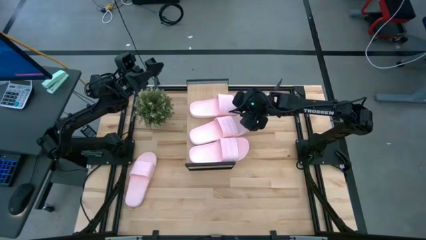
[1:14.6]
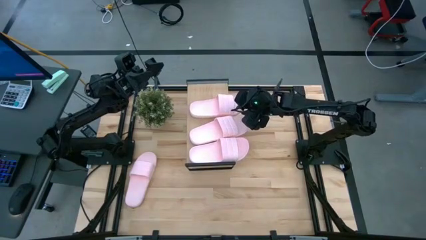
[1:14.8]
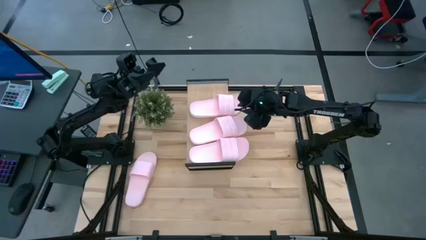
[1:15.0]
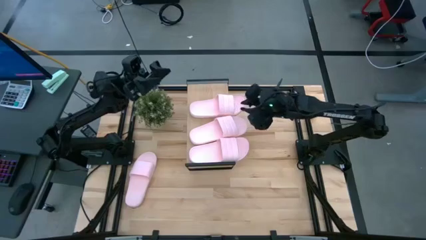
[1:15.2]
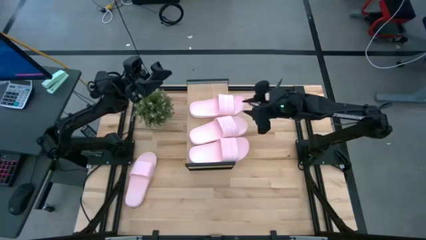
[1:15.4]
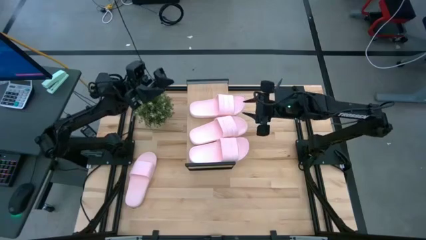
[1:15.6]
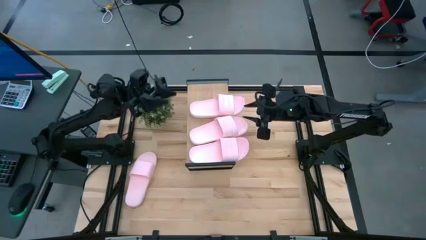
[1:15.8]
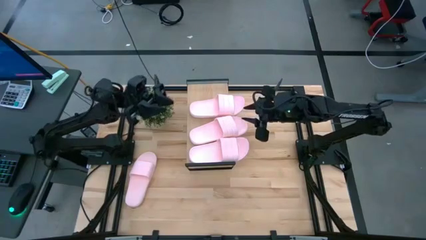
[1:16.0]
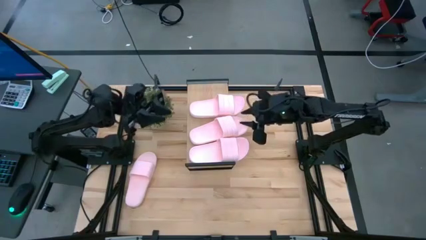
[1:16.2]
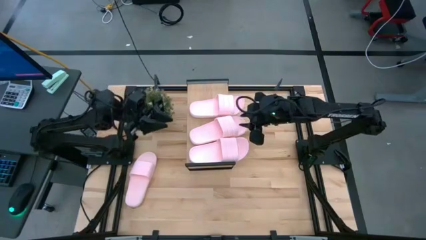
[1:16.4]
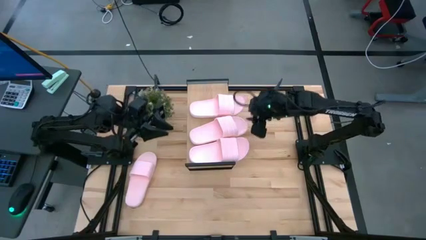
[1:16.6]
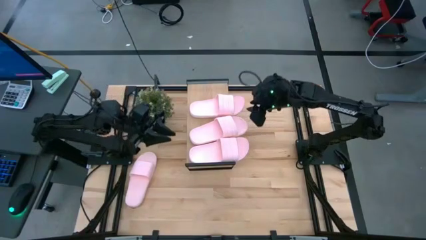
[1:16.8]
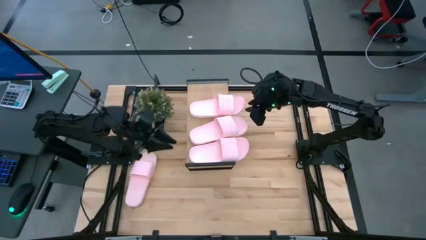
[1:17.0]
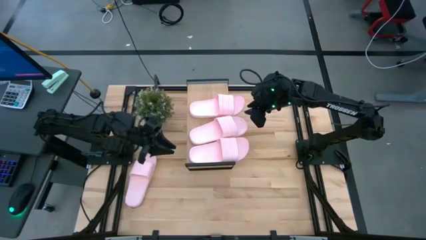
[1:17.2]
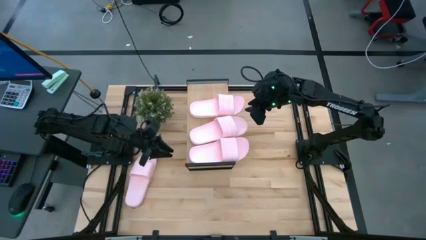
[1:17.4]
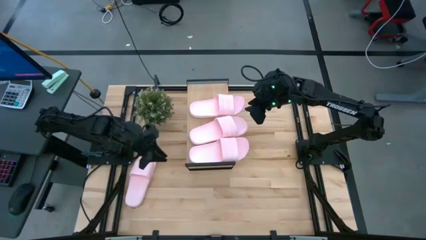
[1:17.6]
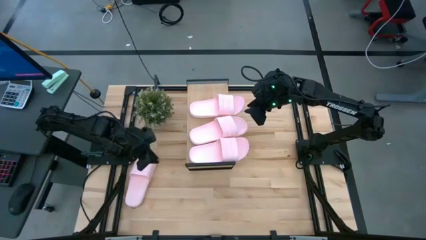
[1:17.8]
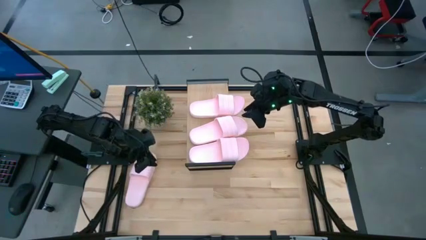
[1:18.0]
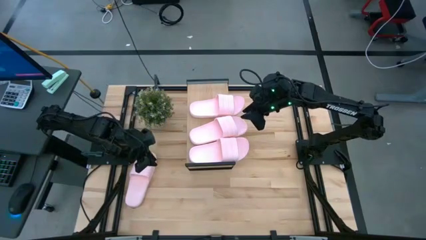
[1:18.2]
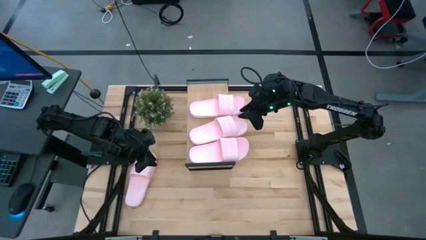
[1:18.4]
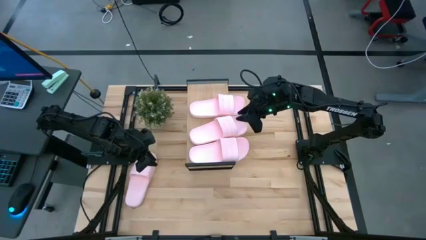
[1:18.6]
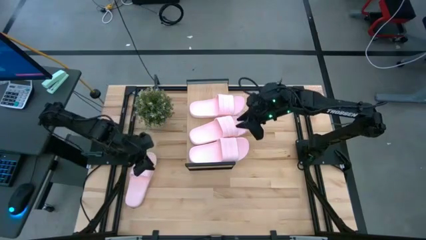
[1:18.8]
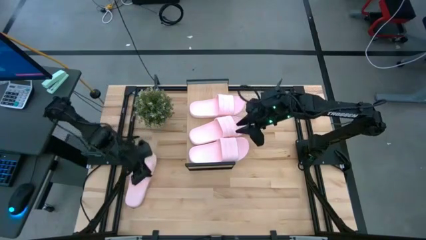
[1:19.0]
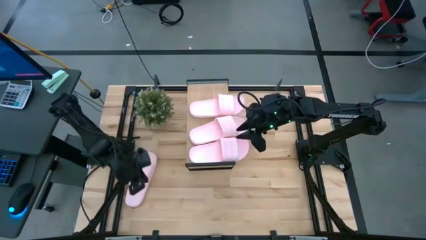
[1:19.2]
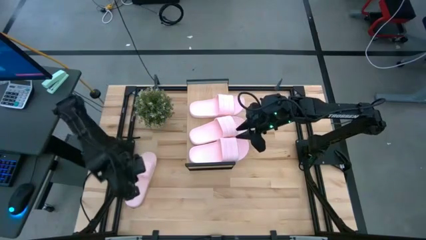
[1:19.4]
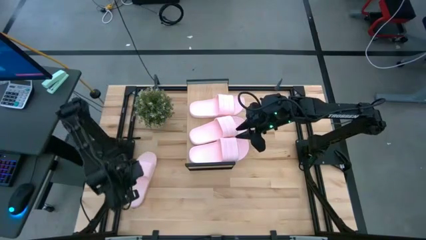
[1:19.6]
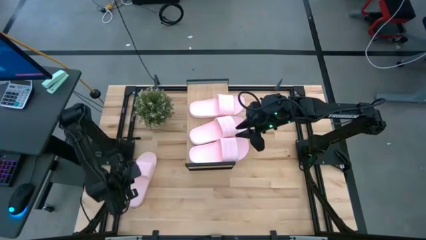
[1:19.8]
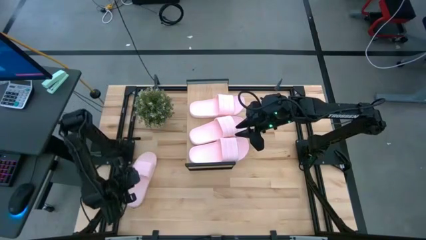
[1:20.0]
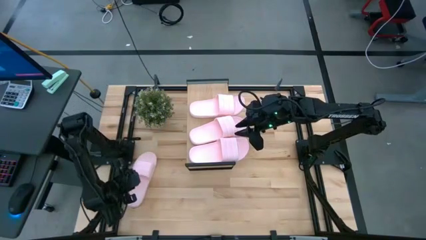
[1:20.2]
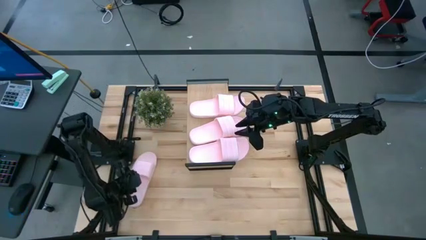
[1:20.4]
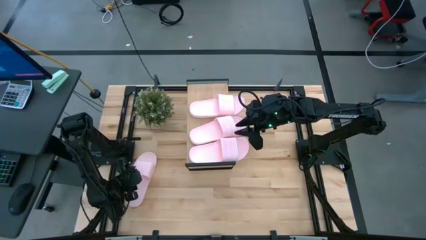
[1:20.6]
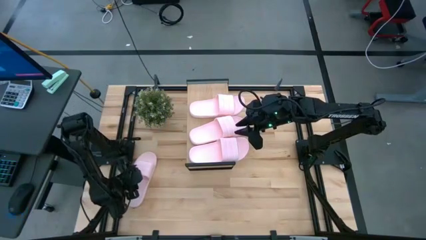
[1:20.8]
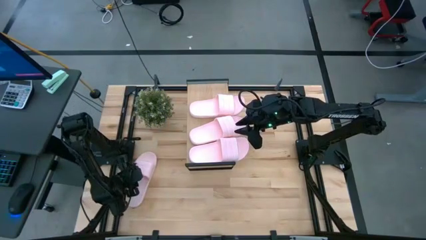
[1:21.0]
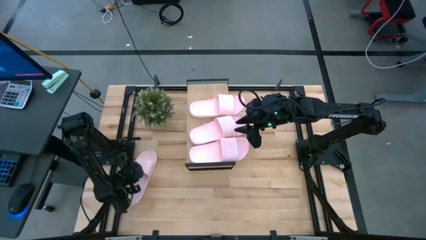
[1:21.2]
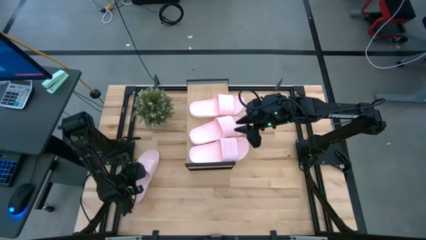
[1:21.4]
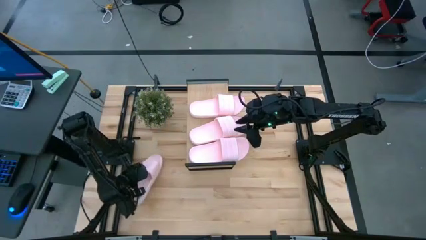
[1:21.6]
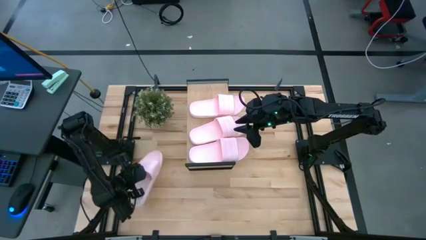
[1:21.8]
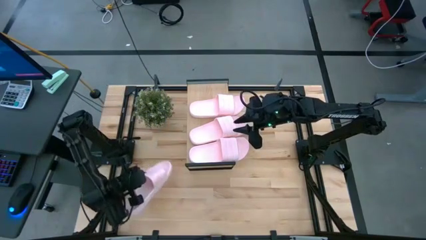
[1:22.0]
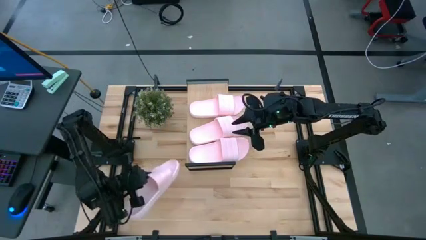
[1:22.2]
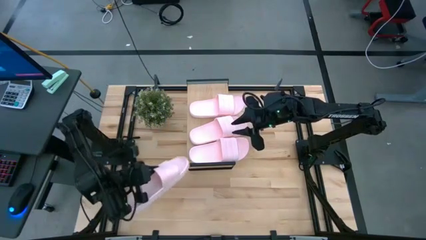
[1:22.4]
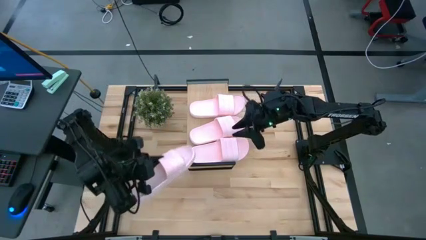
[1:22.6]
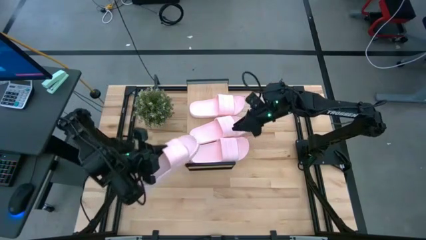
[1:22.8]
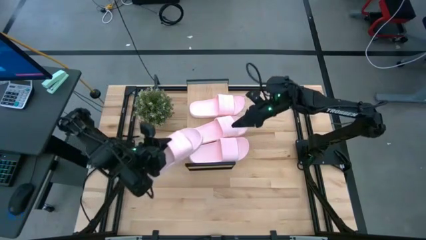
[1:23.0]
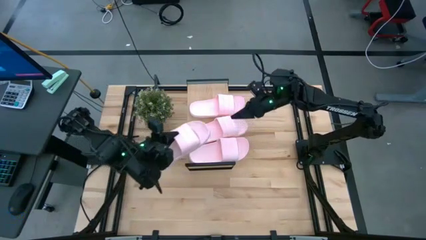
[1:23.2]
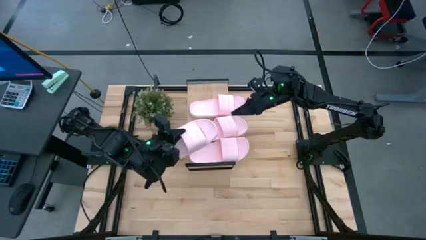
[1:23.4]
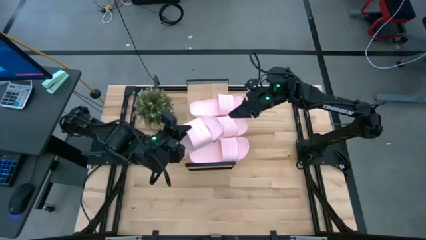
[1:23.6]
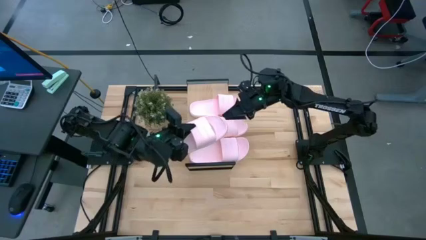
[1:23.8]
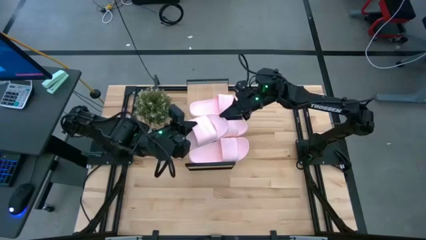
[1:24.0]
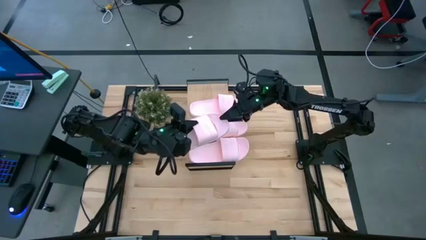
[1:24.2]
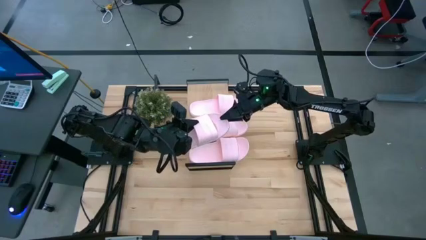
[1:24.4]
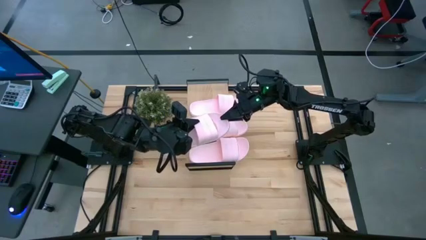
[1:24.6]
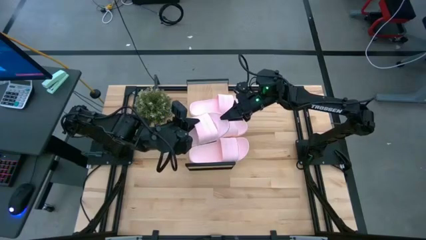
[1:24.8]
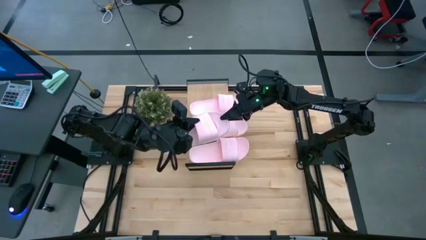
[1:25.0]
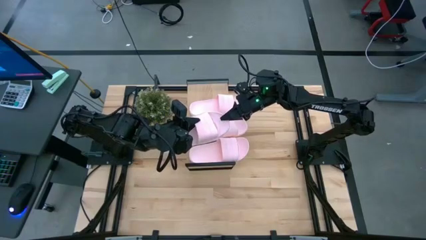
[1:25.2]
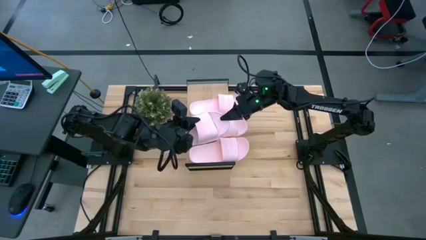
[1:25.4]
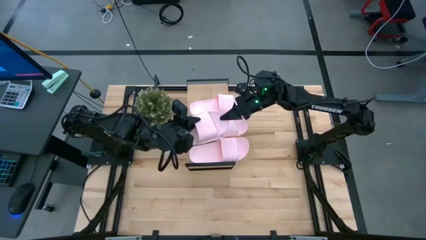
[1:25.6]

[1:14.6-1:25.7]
Task: Pick and place slides into the shelf
Put the pink slide on the shelf

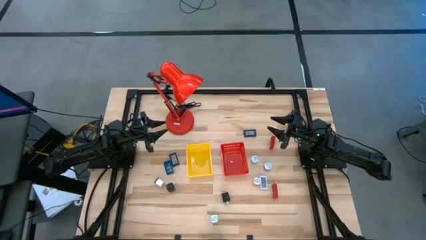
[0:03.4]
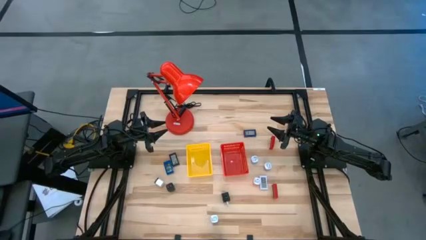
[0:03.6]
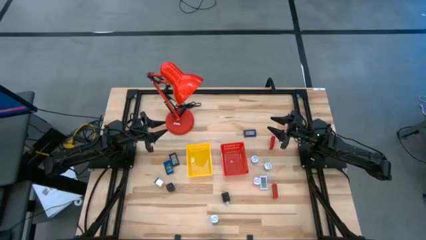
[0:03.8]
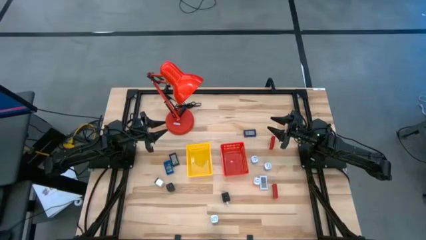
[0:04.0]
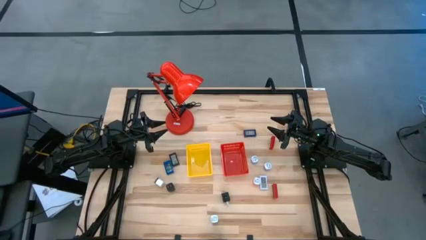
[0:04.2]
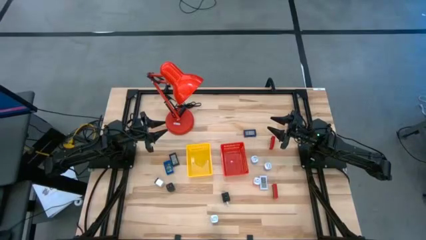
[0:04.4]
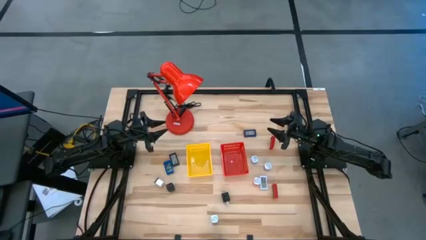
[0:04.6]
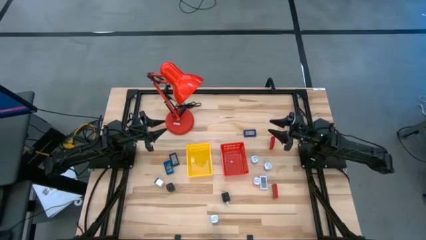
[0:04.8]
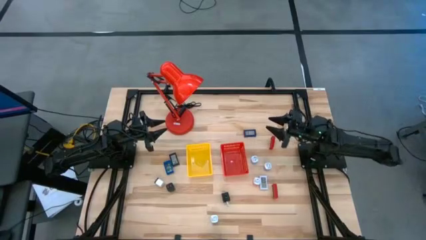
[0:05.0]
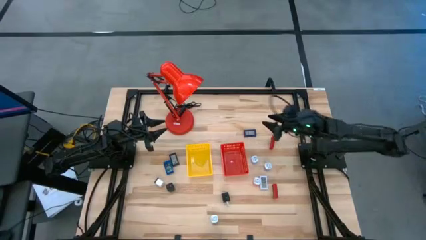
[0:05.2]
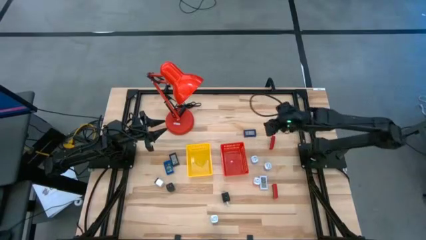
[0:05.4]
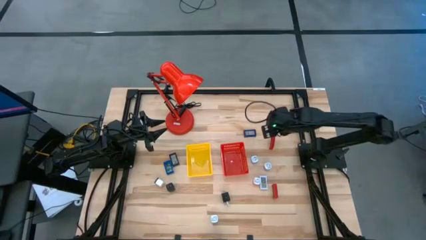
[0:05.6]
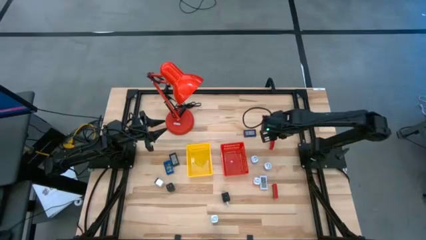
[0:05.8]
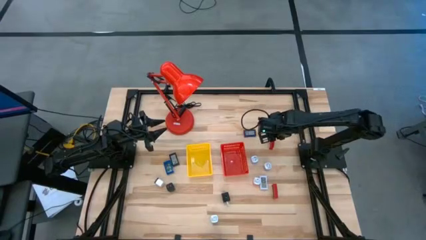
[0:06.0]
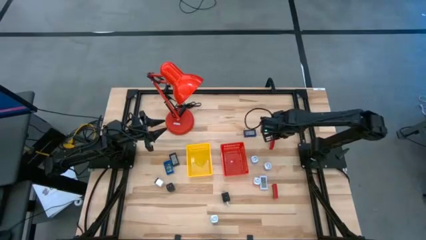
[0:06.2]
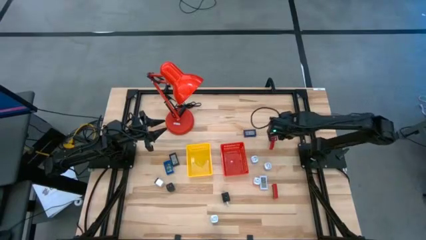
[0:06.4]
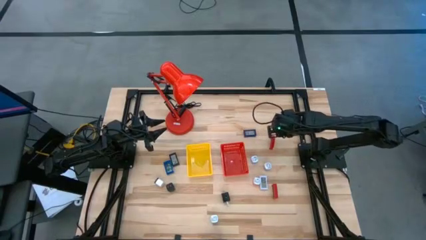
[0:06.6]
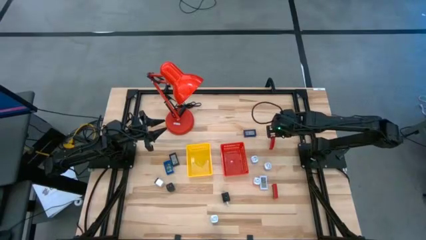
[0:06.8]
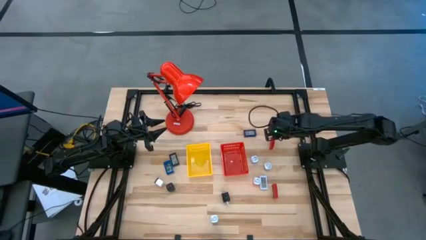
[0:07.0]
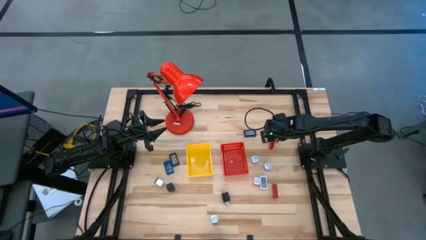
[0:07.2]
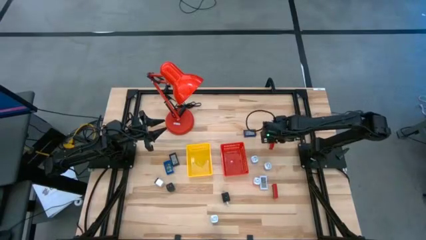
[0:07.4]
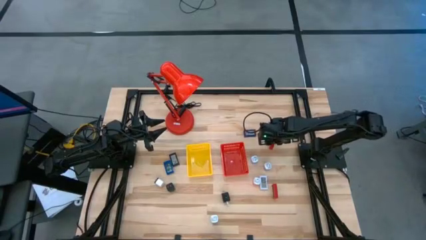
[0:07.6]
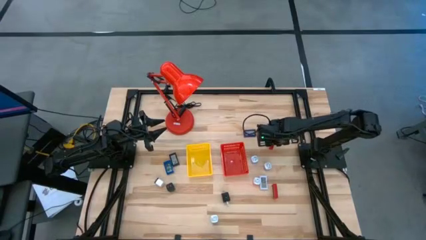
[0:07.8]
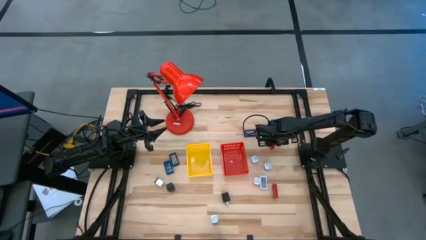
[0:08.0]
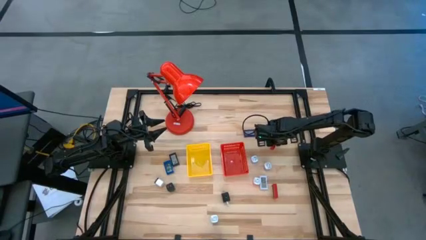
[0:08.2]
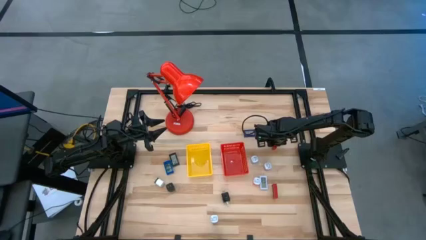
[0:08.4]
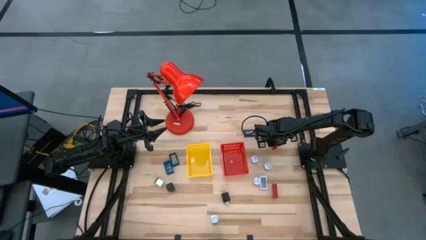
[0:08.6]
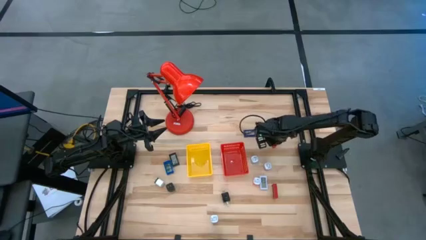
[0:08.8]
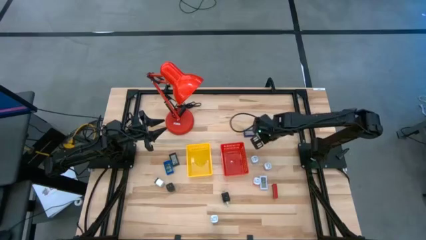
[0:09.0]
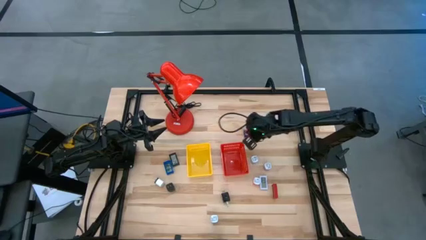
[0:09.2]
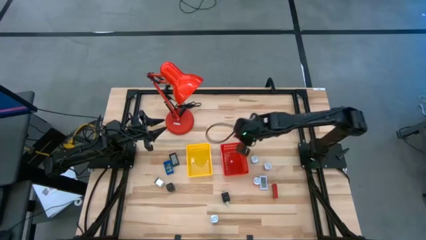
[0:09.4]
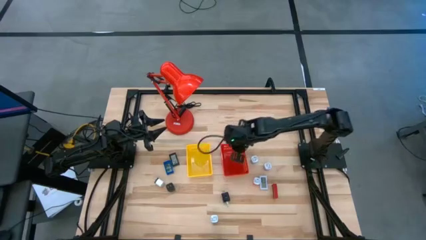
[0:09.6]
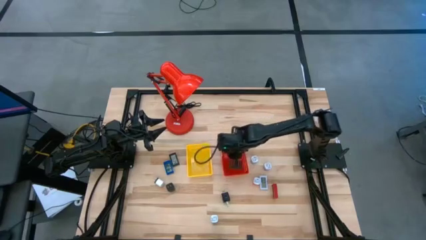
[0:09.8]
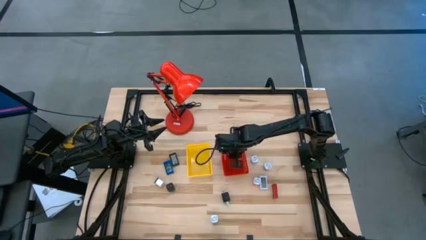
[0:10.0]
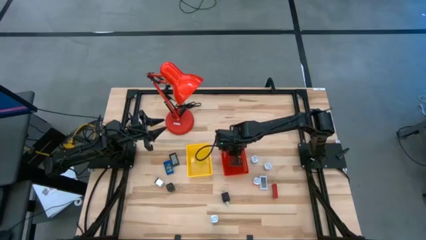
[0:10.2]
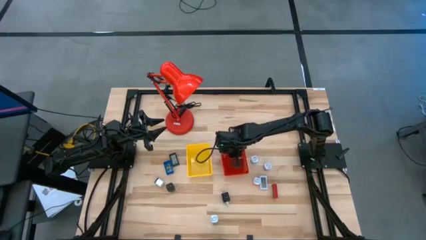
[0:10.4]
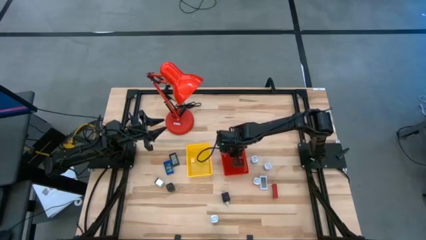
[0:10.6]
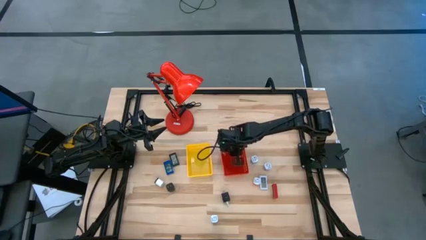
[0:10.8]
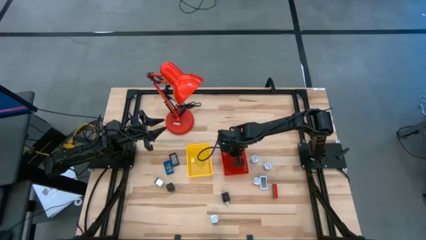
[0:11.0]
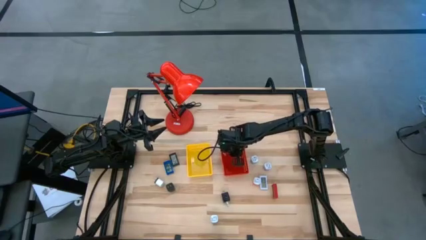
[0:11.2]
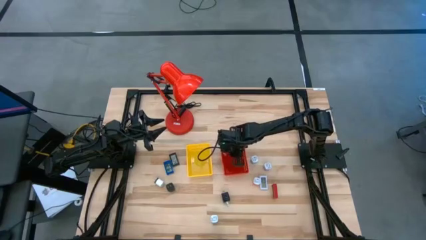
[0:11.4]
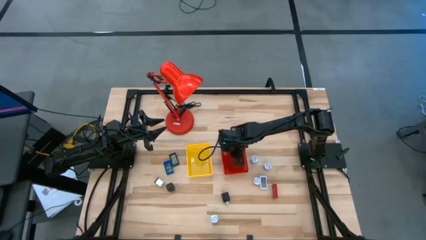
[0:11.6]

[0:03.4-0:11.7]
Task: Pick & Place Office items
Put the top red digital timer into the red bin
